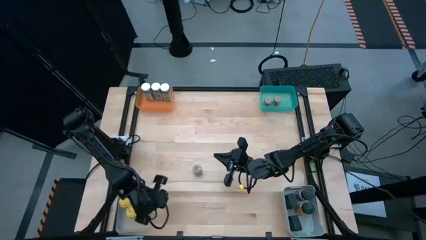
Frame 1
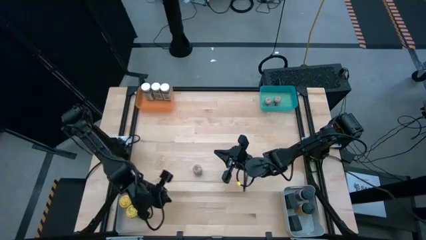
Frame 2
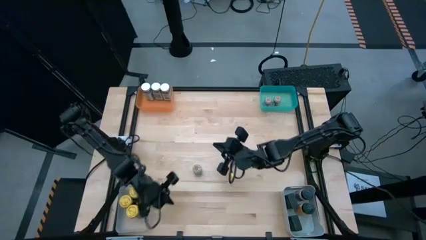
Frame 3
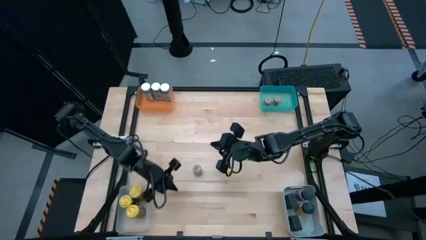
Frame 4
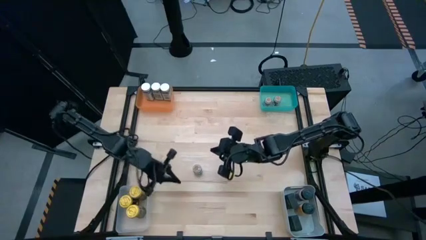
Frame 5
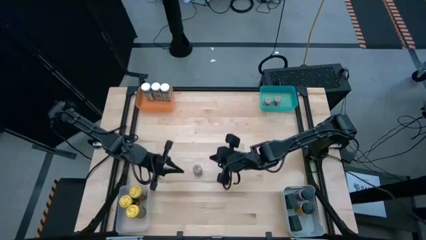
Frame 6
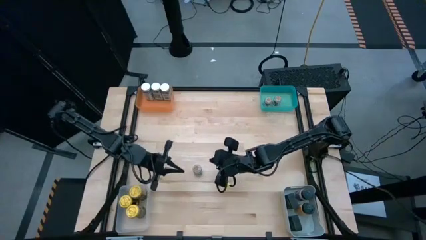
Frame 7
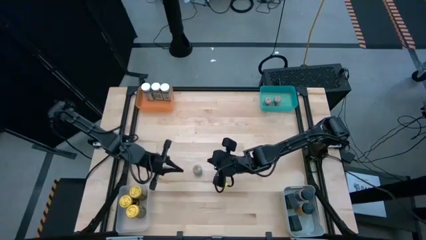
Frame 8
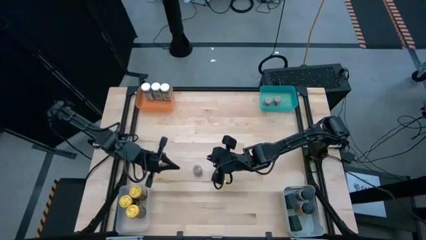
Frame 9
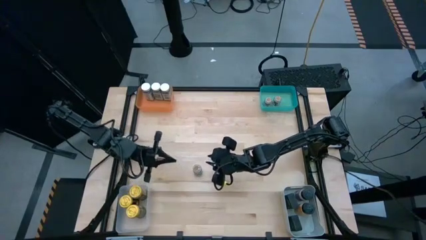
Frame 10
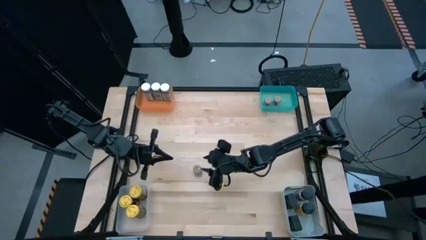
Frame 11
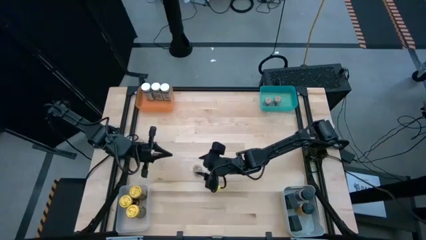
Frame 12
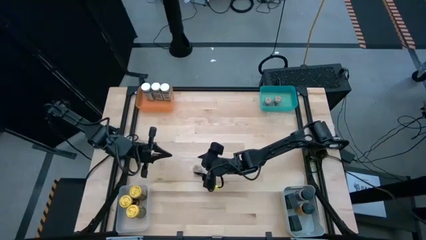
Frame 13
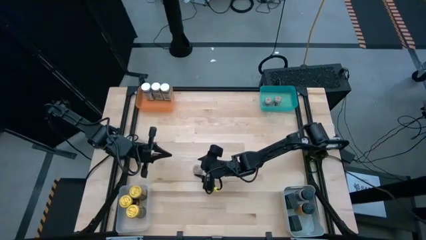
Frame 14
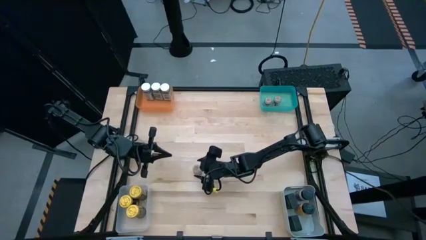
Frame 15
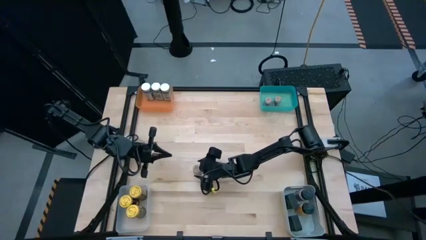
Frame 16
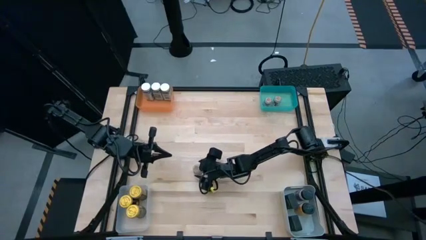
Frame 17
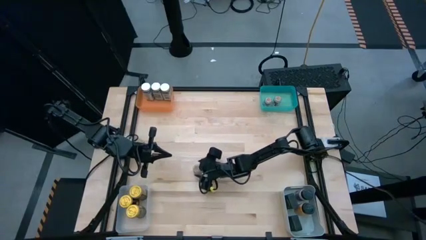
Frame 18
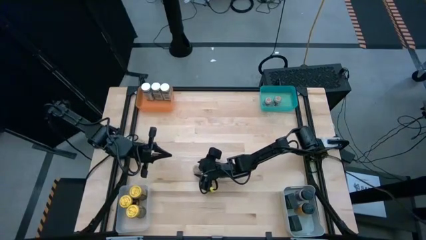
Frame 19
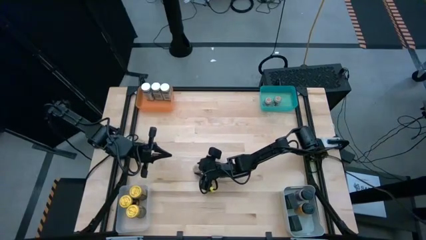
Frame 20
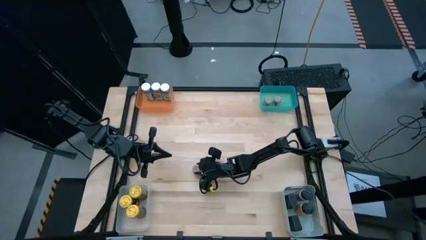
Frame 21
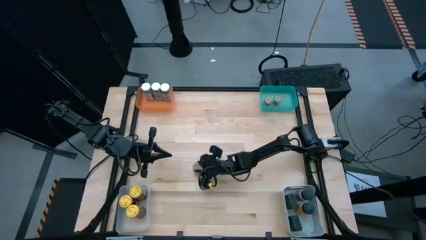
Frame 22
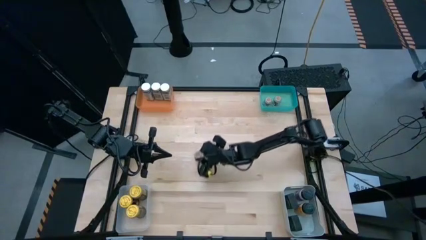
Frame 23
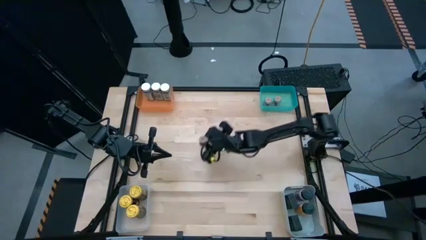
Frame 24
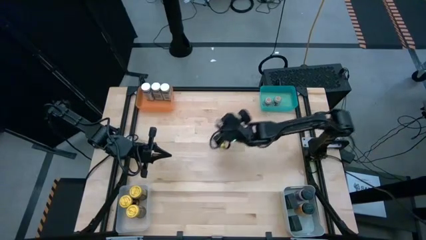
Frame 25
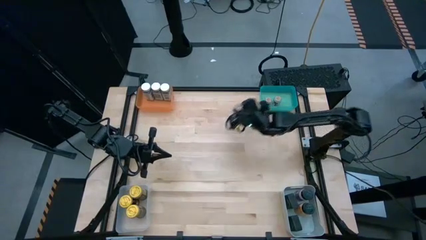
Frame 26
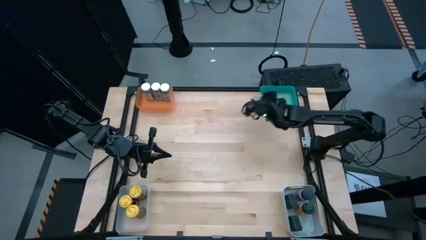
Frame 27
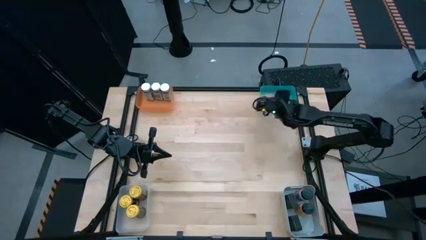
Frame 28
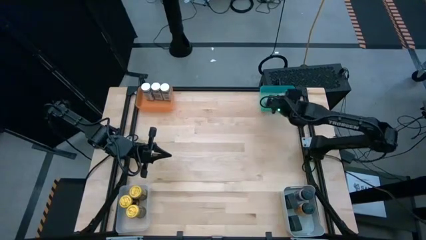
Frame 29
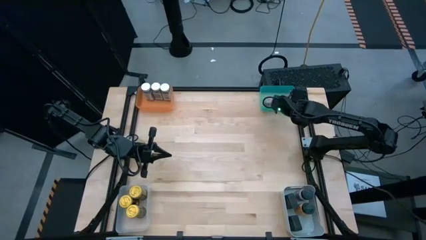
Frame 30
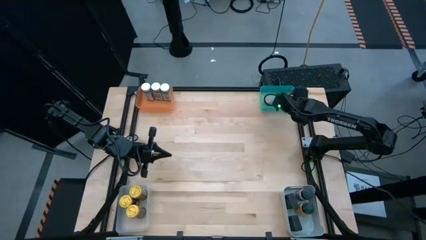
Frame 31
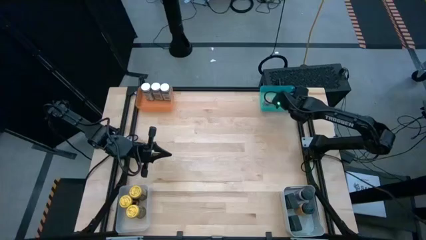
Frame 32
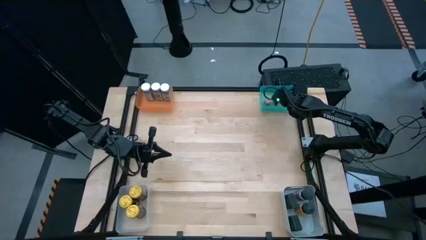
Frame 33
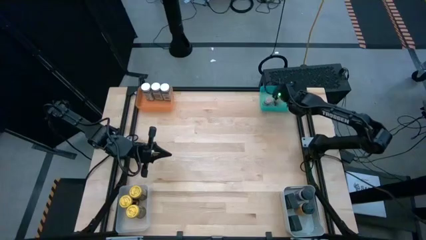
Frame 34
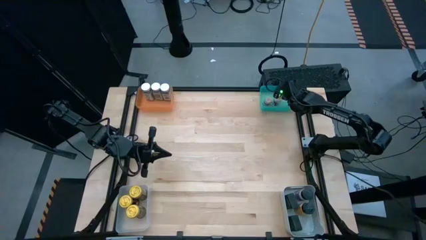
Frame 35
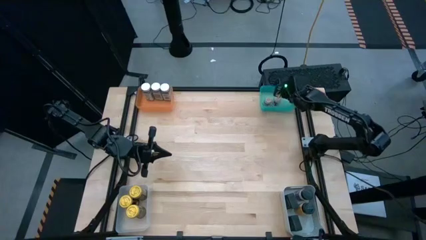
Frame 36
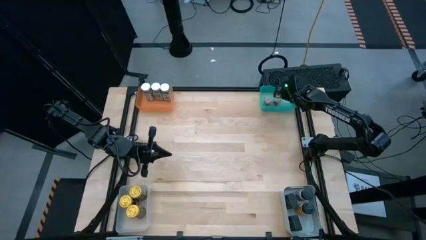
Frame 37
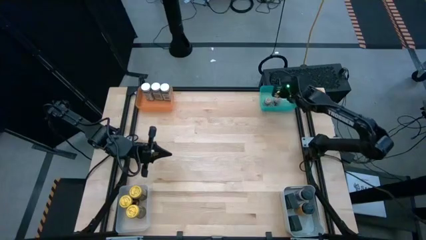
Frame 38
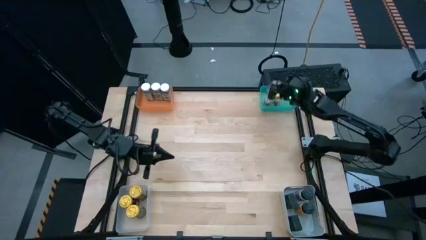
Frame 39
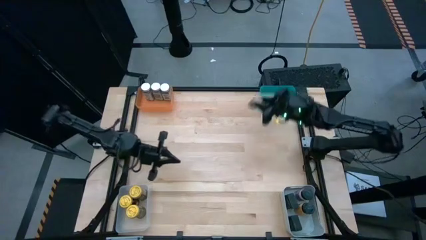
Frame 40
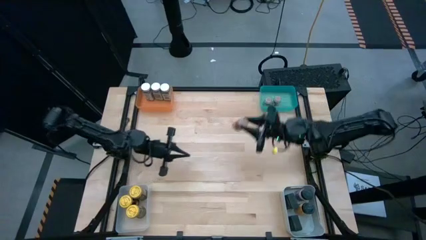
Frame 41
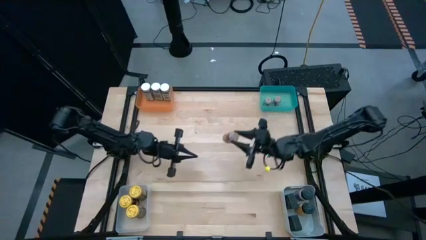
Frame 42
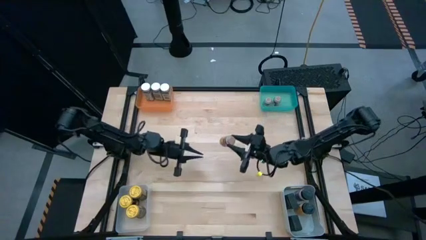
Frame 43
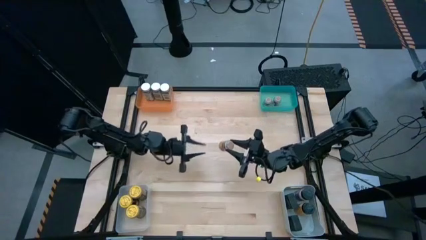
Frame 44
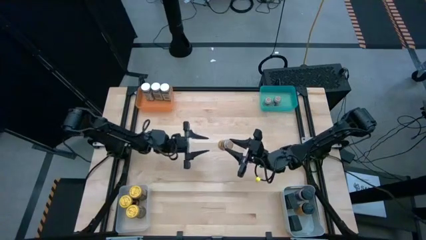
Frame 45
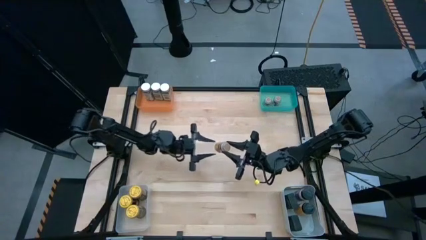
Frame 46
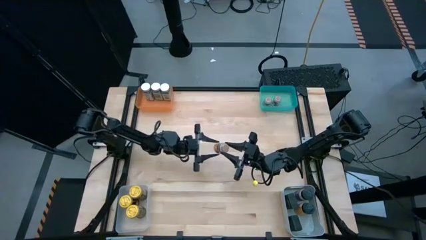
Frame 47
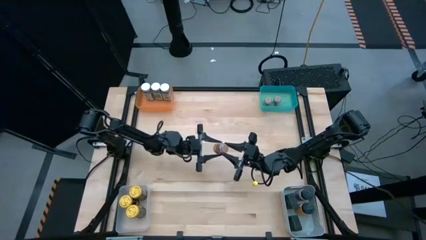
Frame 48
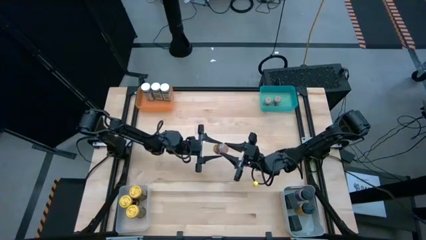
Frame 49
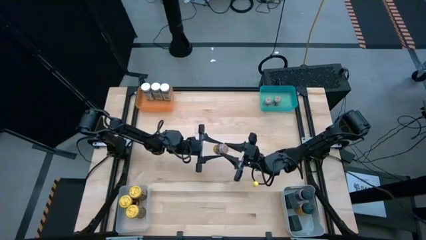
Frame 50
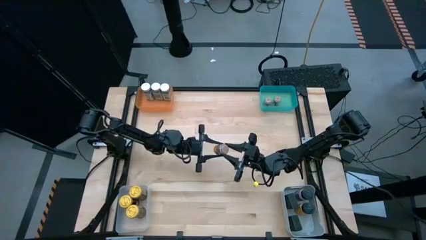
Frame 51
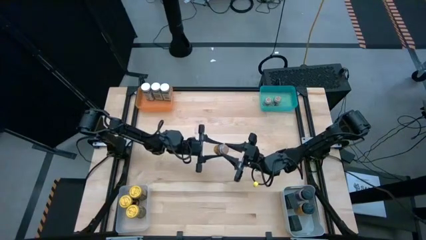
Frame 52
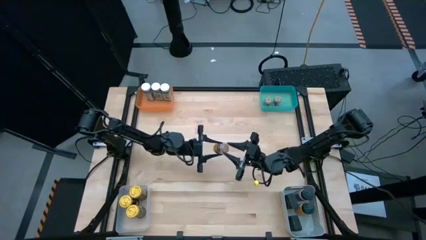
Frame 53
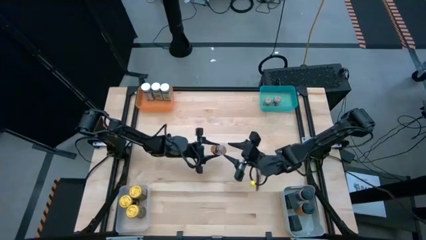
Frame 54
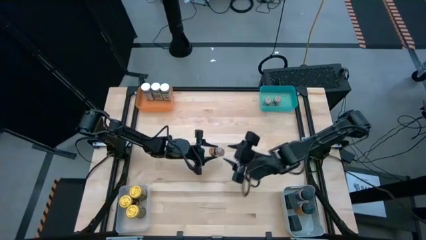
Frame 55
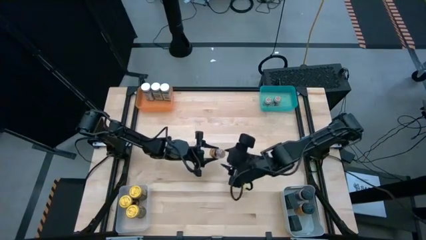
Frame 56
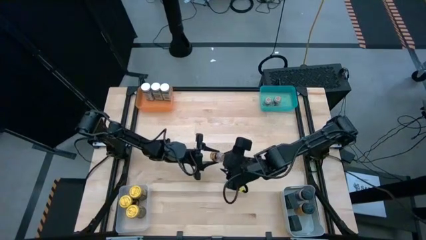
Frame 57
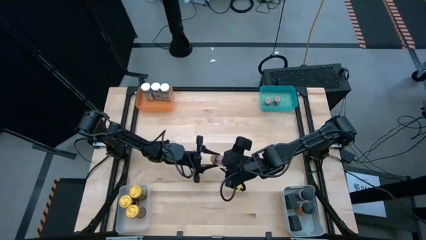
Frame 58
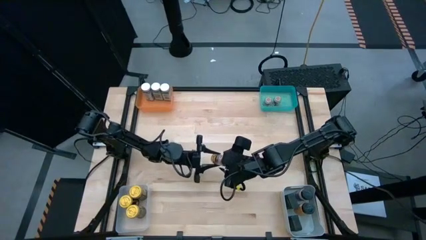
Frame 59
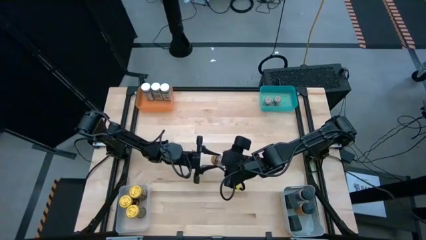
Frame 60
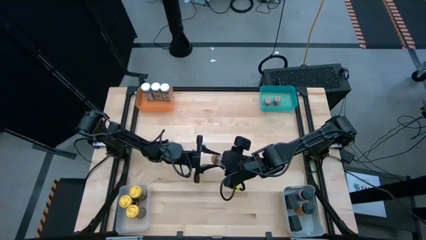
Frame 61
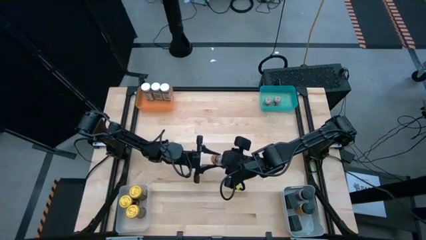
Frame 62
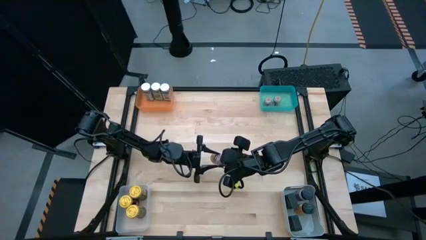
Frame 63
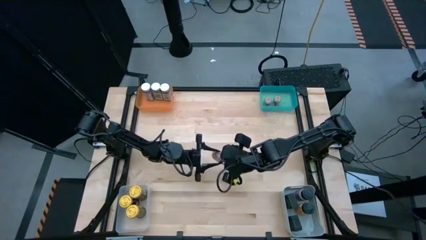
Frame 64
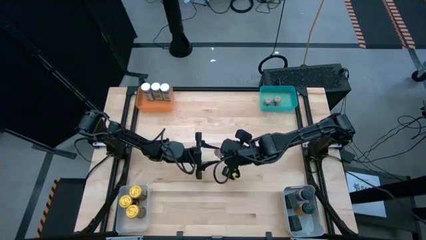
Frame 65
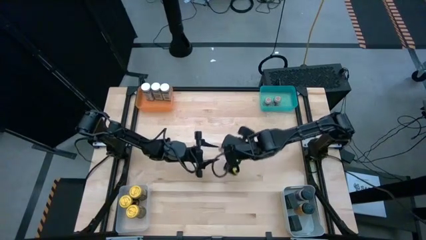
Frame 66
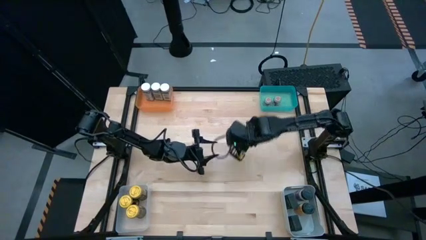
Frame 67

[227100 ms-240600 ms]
Task: Sort spices by type
Put the brown seasoning bottle into the blue bin

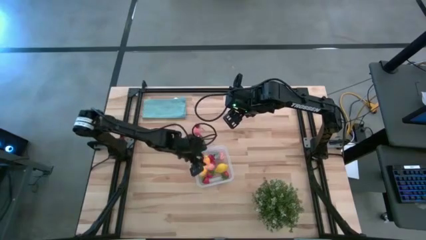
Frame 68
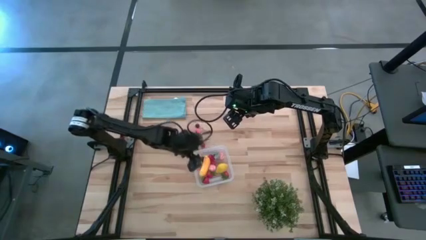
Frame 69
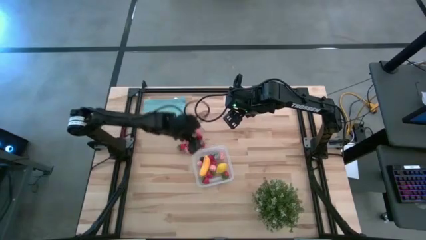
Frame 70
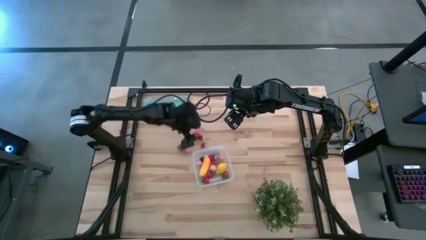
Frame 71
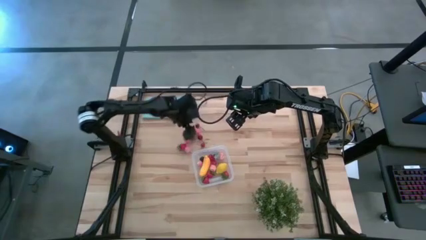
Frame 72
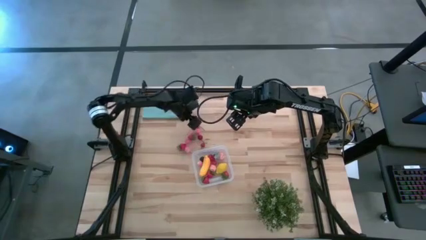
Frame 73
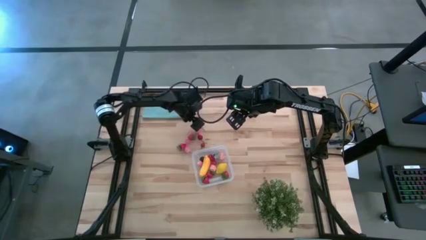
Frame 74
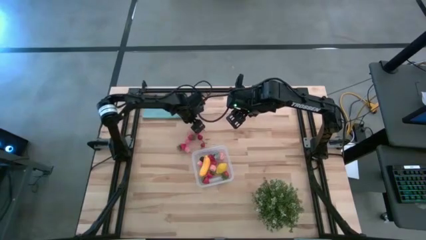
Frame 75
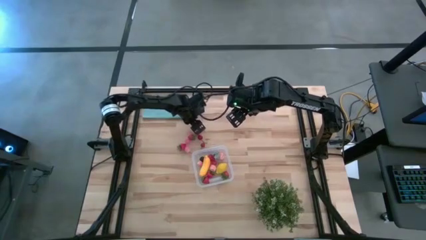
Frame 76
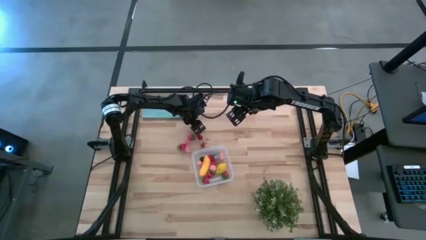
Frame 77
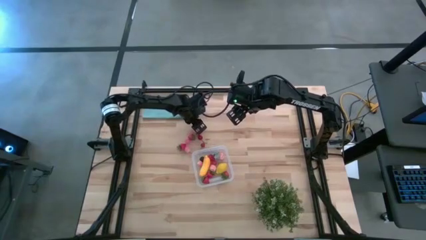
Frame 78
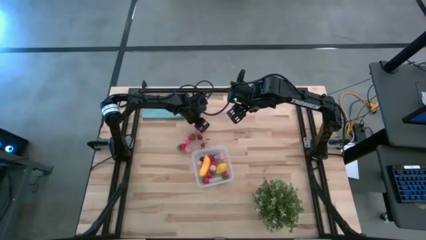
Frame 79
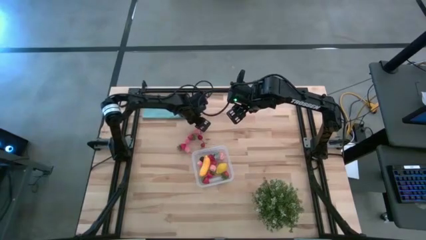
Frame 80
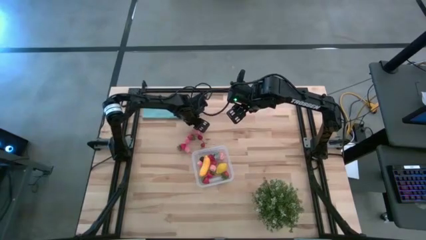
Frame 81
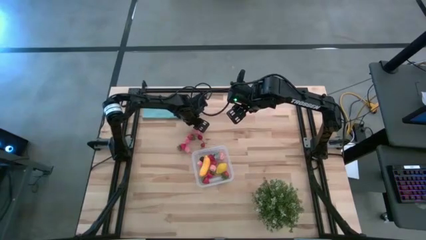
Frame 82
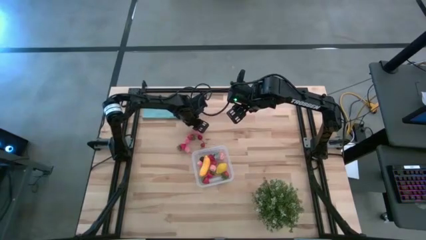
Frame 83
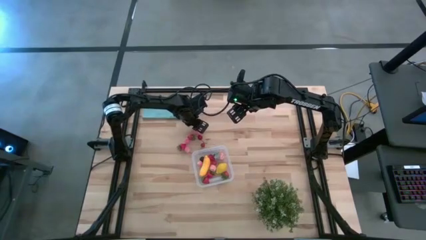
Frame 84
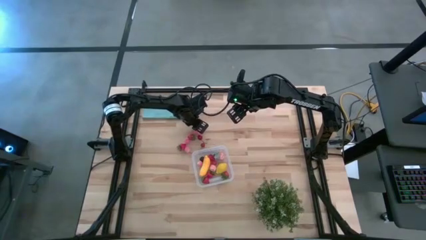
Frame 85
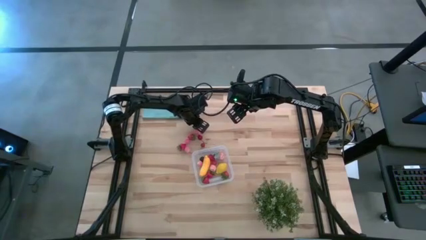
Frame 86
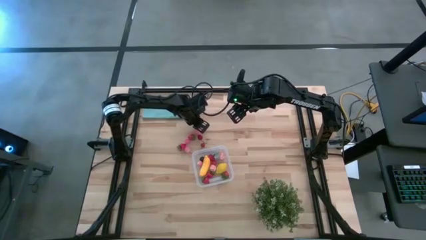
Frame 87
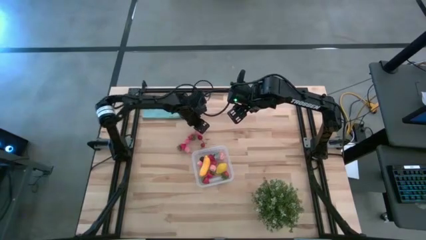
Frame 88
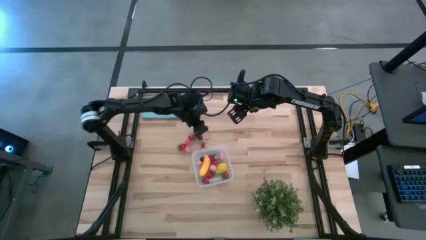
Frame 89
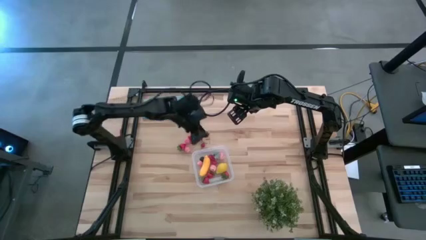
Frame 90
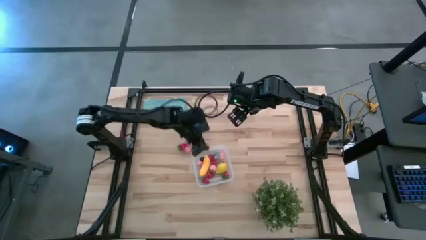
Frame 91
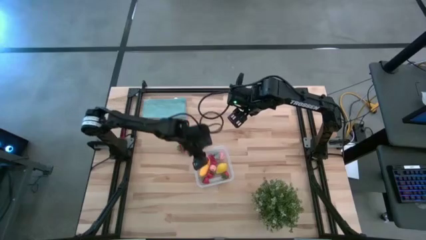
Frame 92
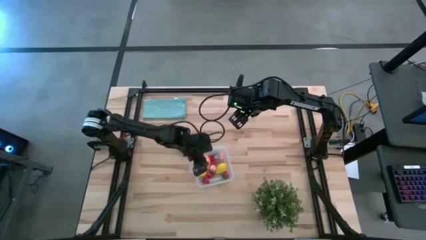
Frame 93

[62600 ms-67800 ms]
Task: Pick and placing Produce into tupperware
Put the red cherry into the transparent bin
